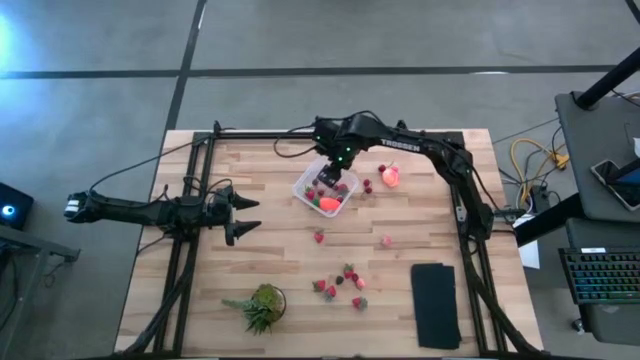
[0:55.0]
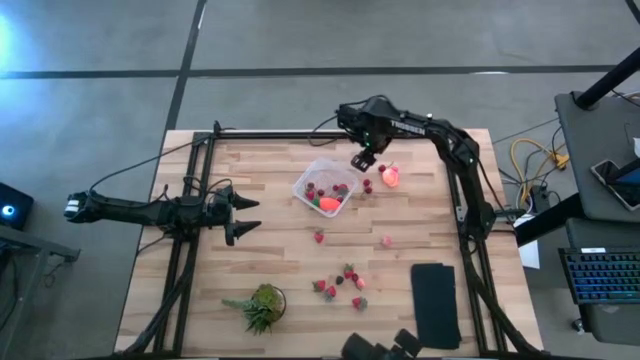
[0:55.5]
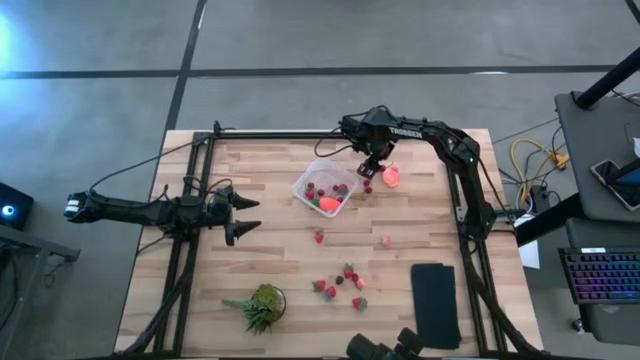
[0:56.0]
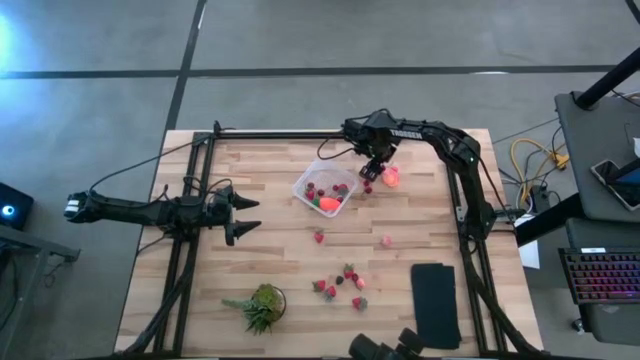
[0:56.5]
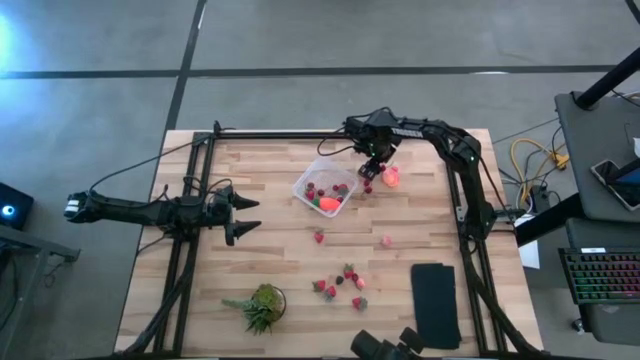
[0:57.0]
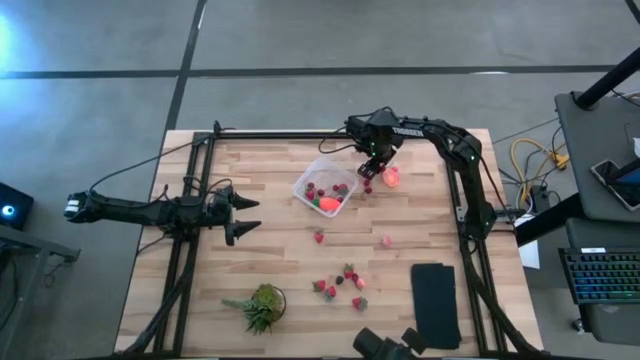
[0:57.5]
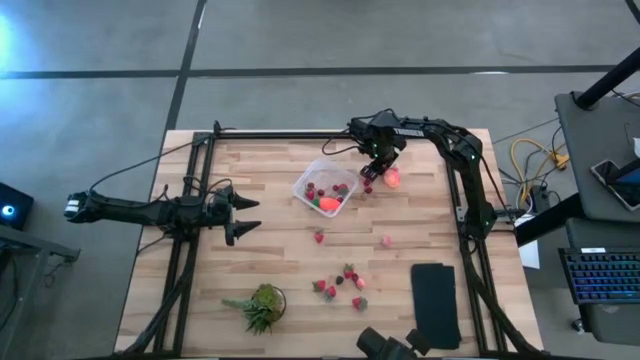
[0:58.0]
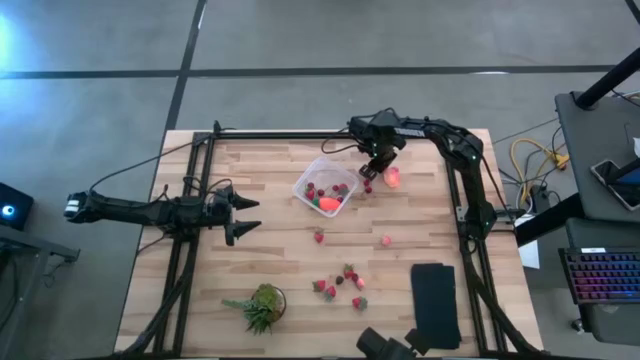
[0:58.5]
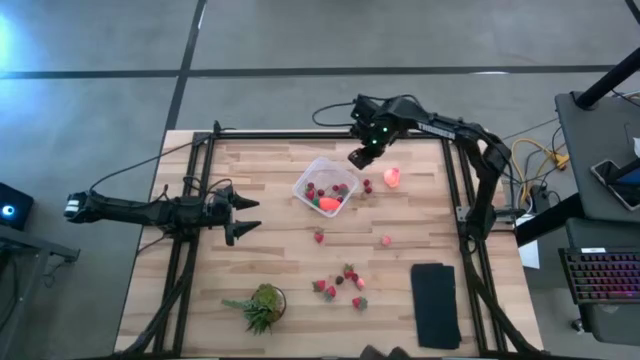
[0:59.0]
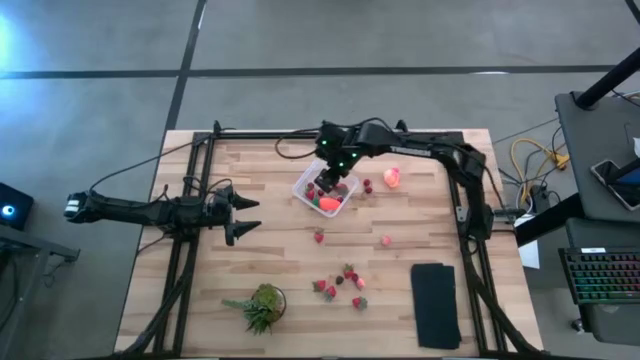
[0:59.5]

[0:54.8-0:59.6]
Task: Pick and placing Produce into tupperware
Put the red cherry into the transparent bin

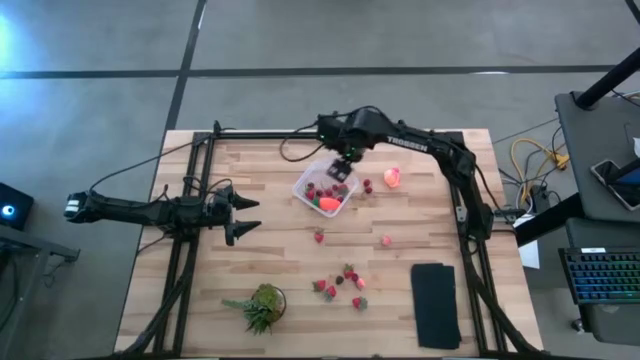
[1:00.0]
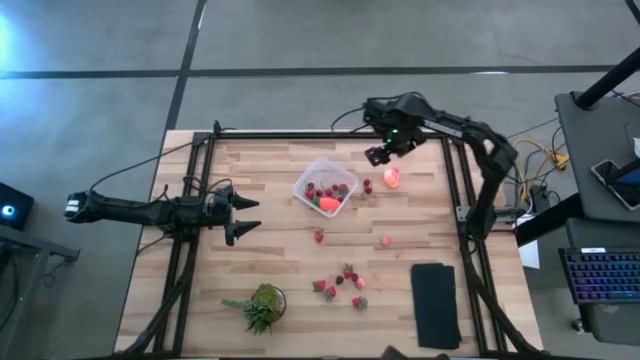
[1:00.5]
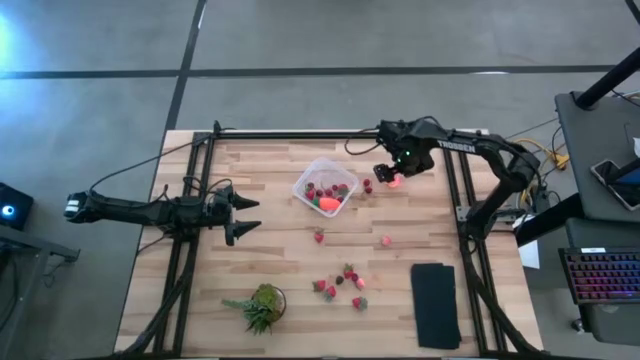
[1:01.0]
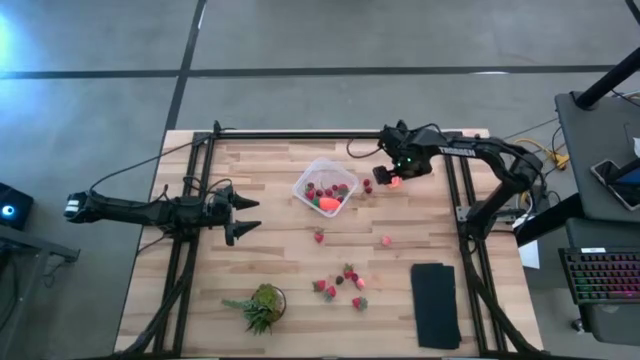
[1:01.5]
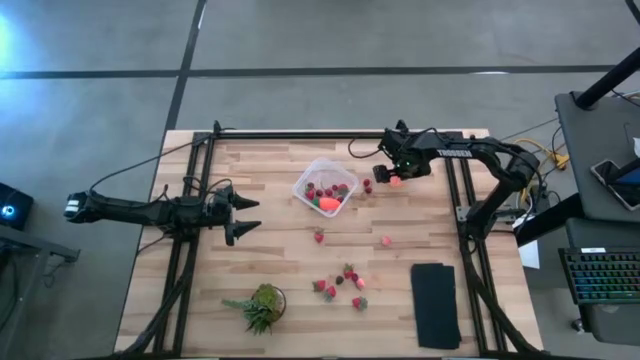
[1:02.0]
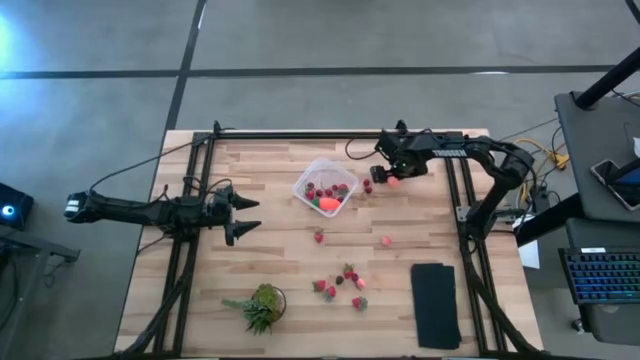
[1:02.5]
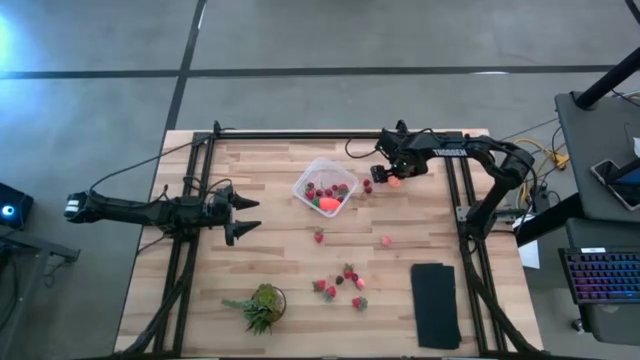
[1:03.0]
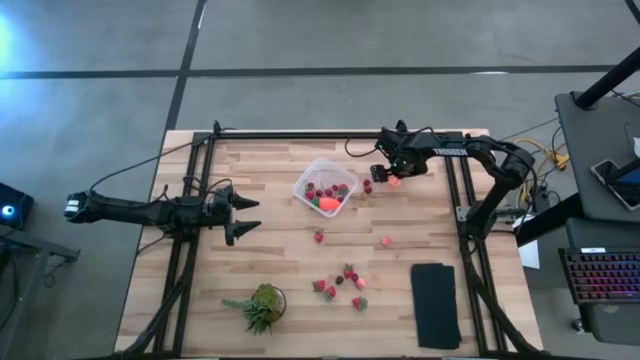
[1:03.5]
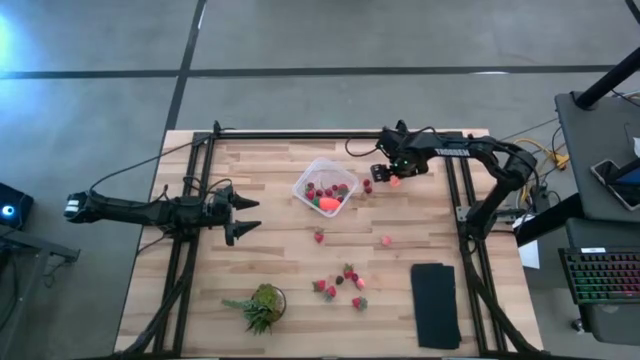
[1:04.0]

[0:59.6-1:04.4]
Put the pink peach into the transparent bin

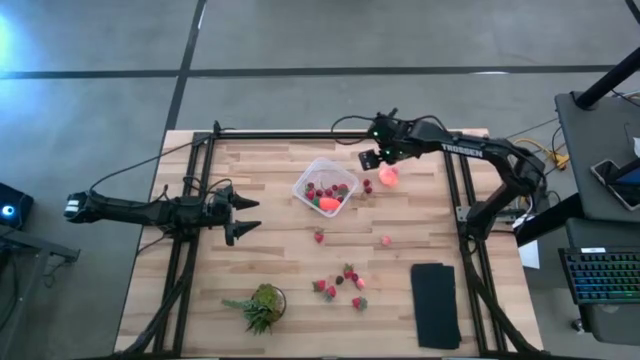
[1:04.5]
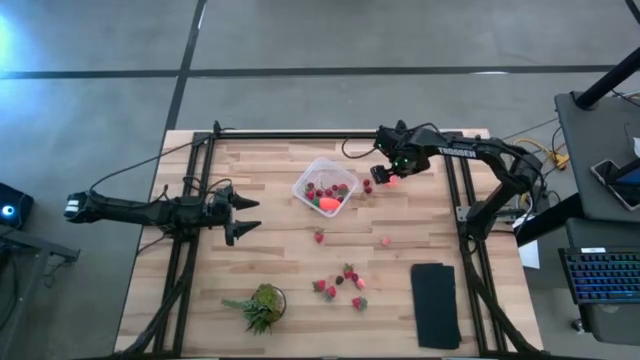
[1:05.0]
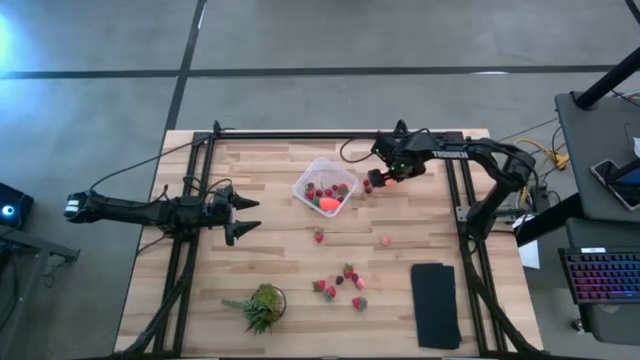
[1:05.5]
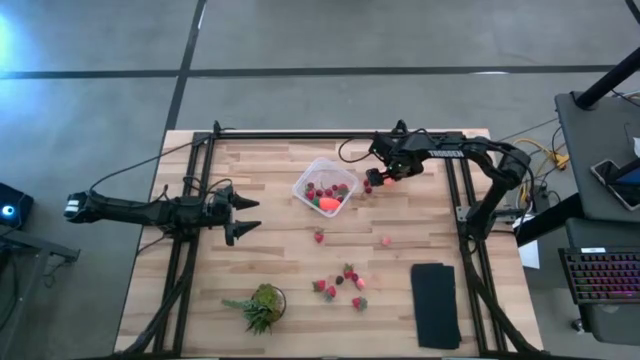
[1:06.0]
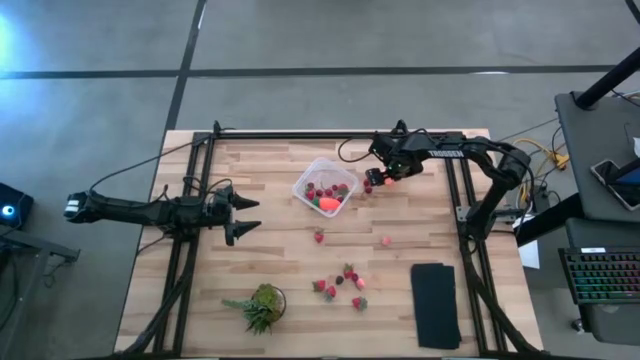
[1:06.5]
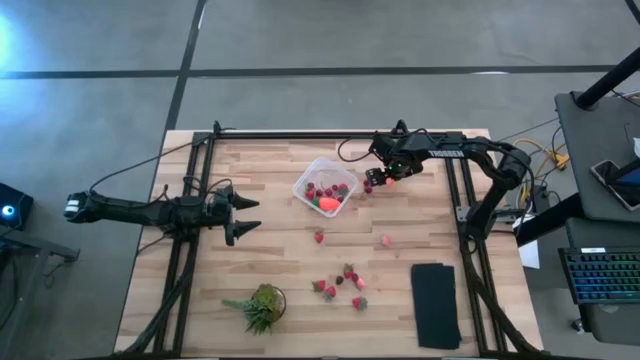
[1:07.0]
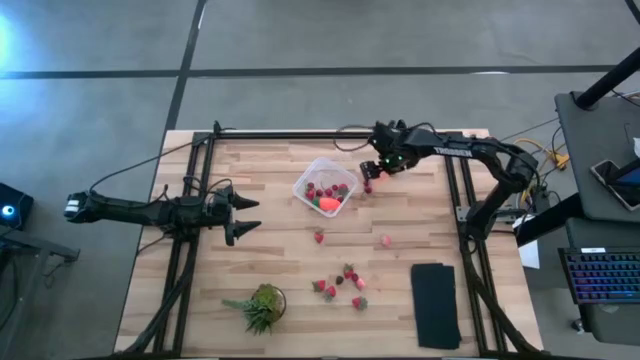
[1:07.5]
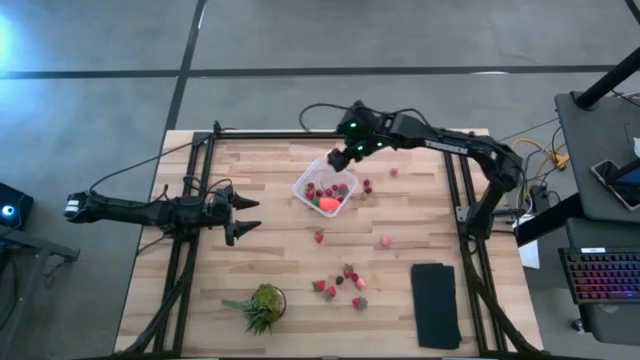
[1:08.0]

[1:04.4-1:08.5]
Put the pink peach into the transparent bin

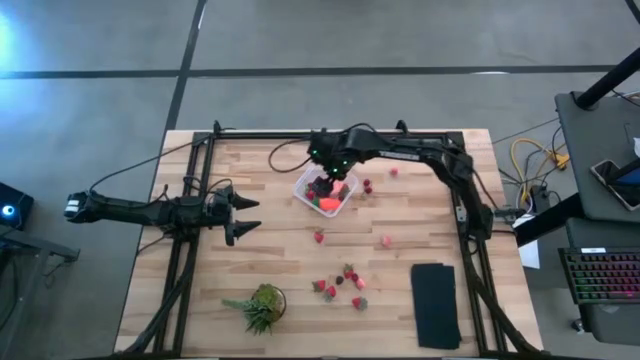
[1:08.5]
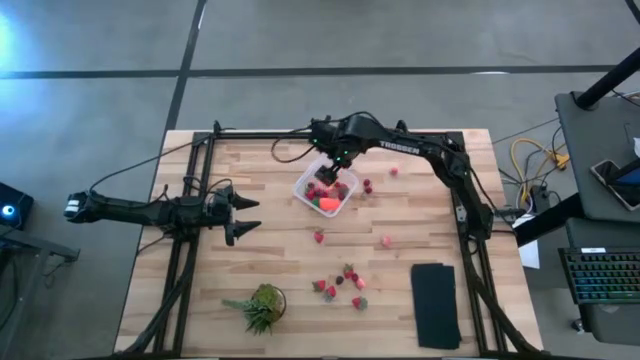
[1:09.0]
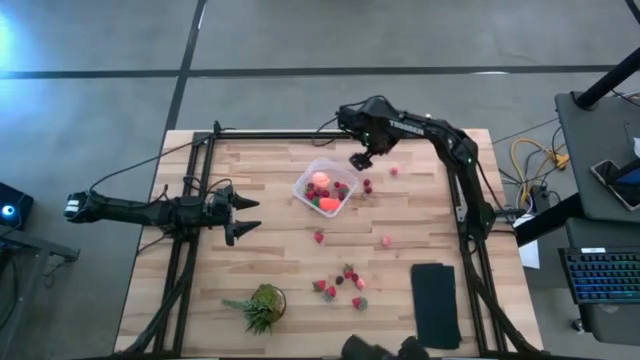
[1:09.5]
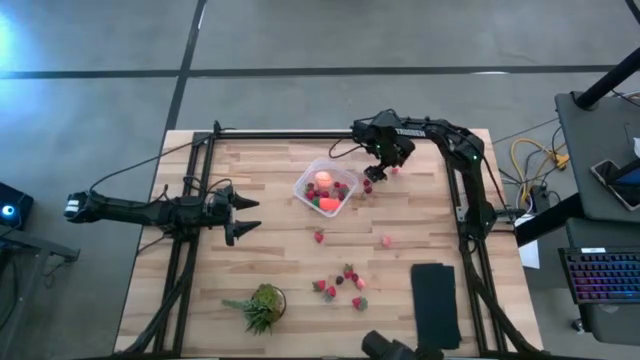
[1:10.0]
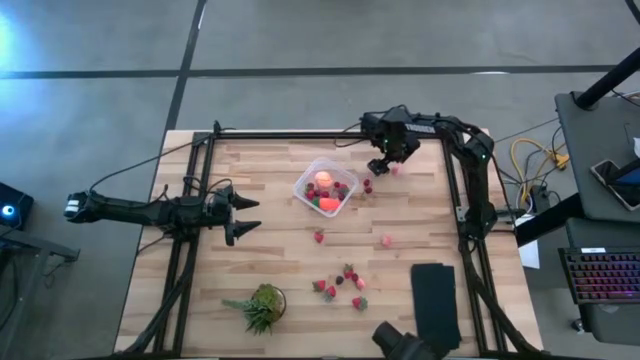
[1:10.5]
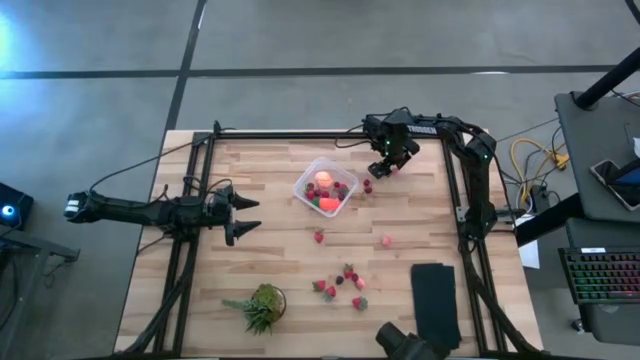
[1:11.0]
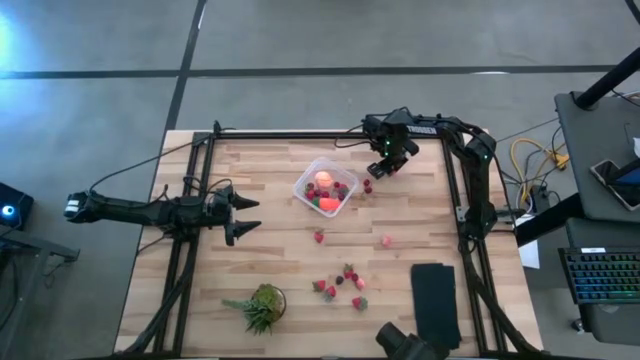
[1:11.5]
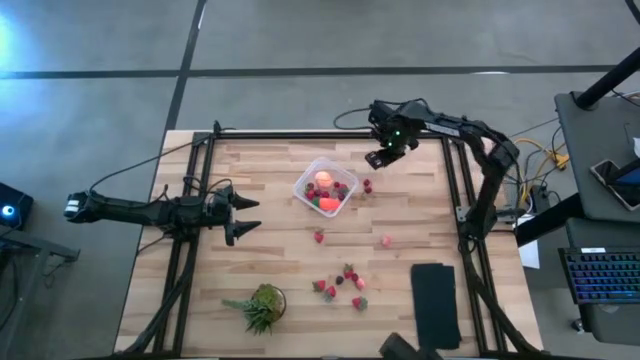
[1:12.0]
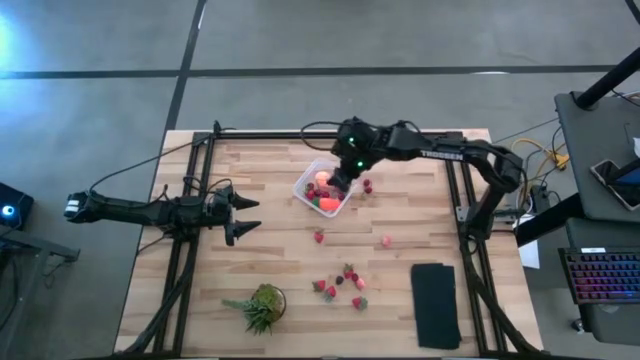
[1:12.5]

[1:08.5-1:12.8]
Put the pink peach into the transparent bin

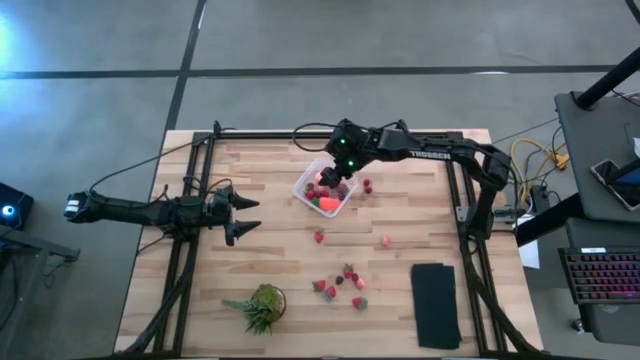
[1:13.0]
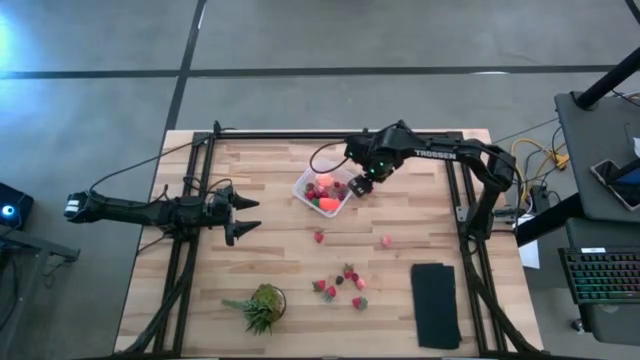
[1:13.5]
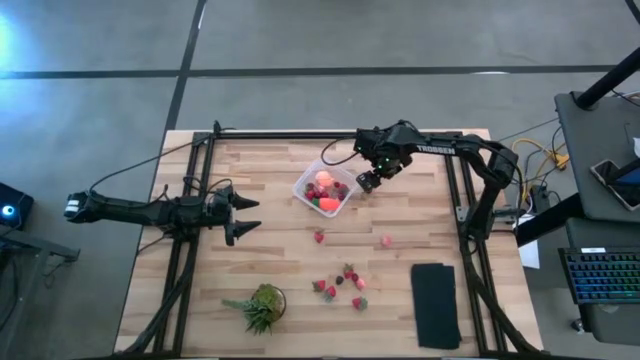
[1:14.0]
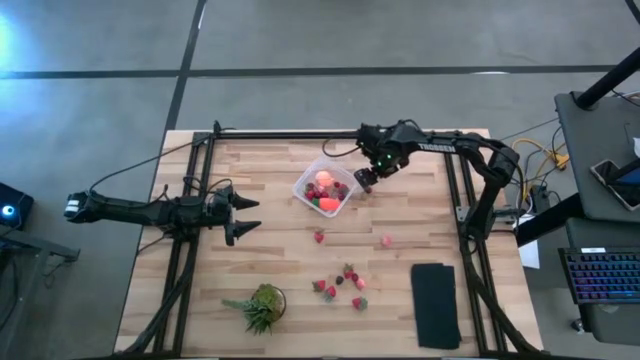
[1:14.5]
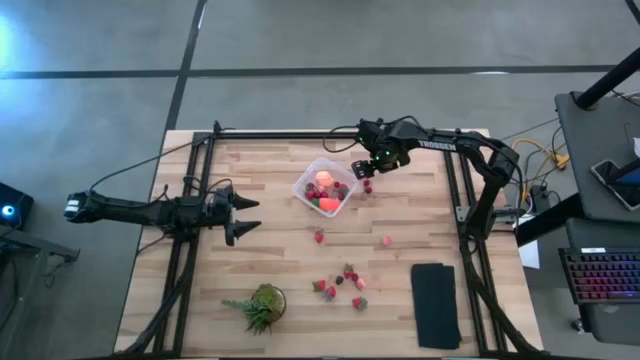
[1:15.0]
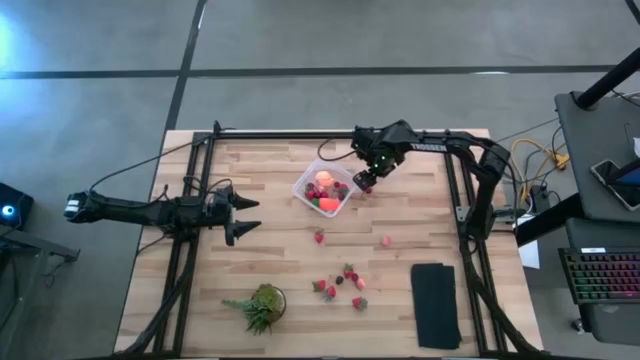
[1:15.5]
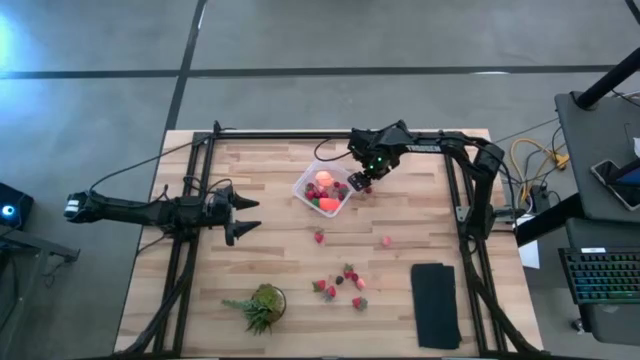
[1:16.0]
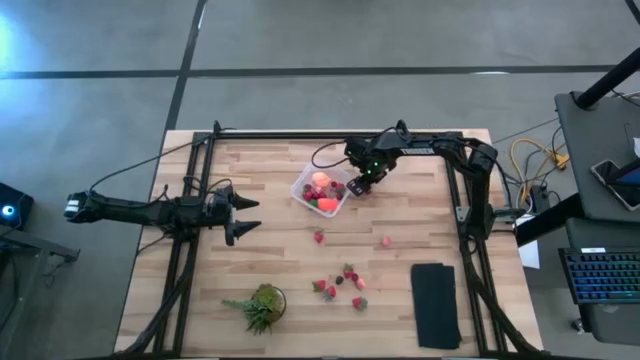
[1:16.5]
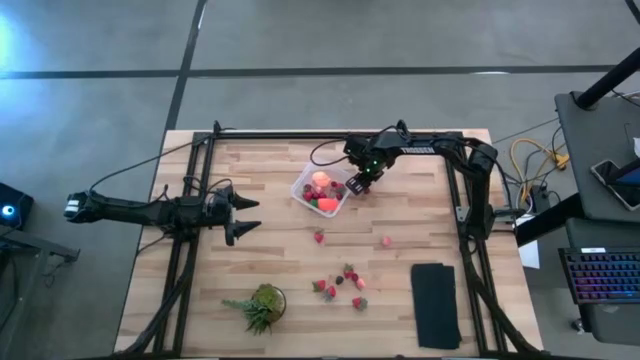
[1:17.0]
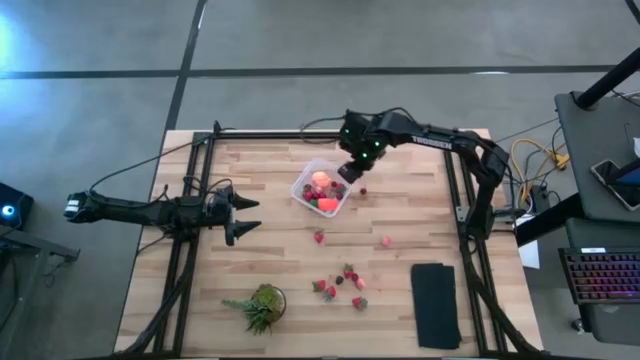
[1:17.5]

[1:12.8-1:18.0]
Put the red cherry into the transparent bin
